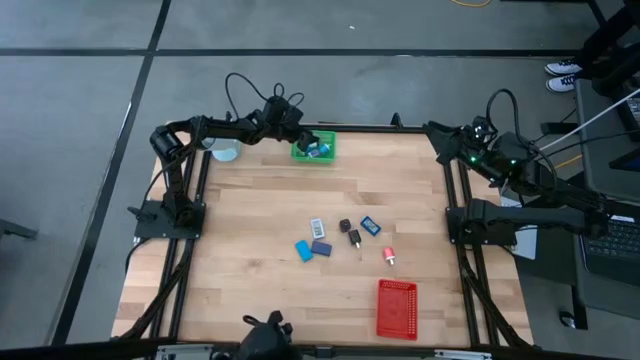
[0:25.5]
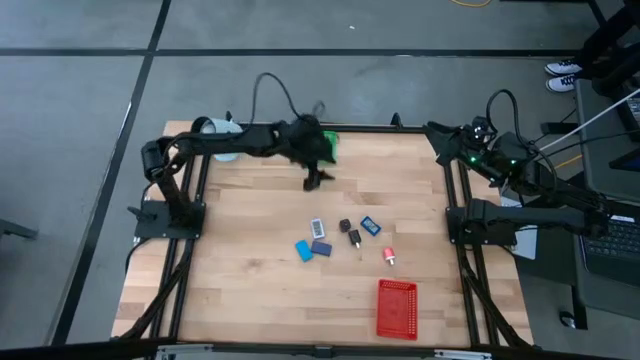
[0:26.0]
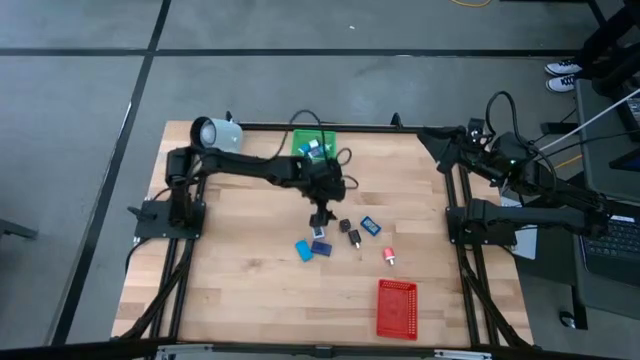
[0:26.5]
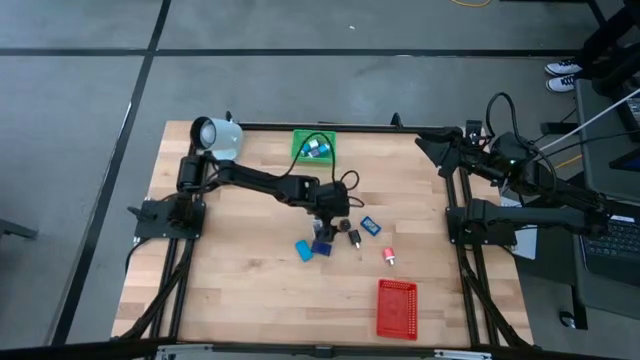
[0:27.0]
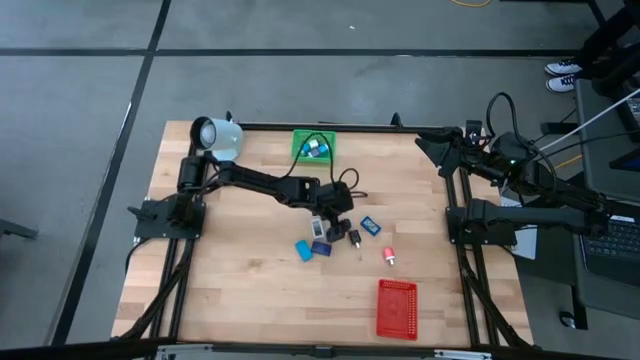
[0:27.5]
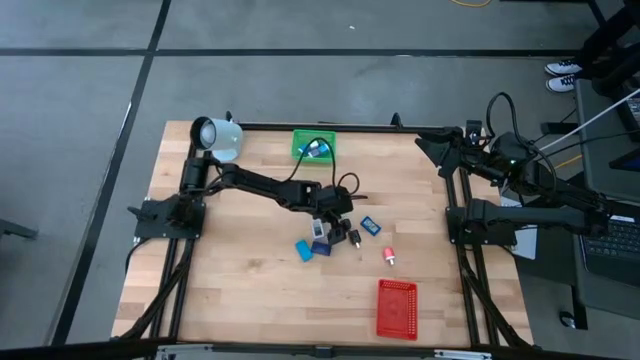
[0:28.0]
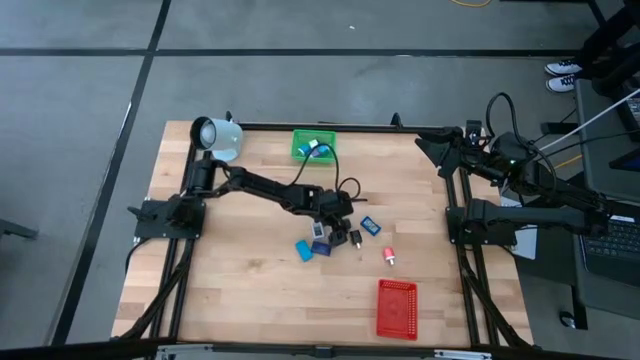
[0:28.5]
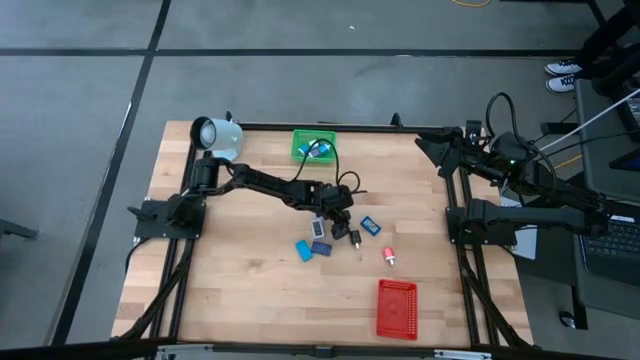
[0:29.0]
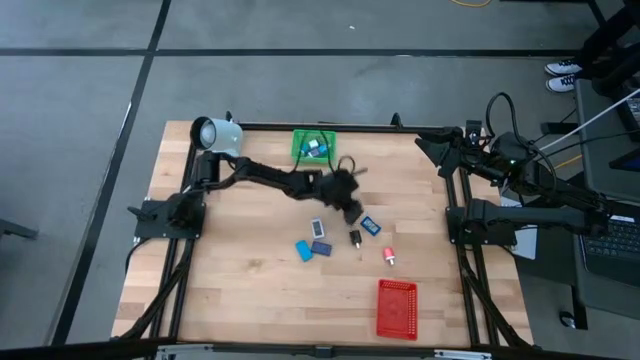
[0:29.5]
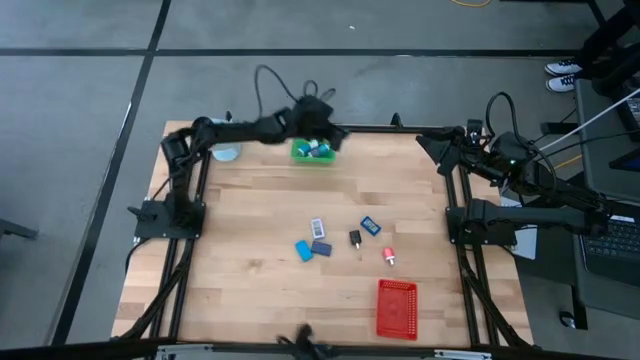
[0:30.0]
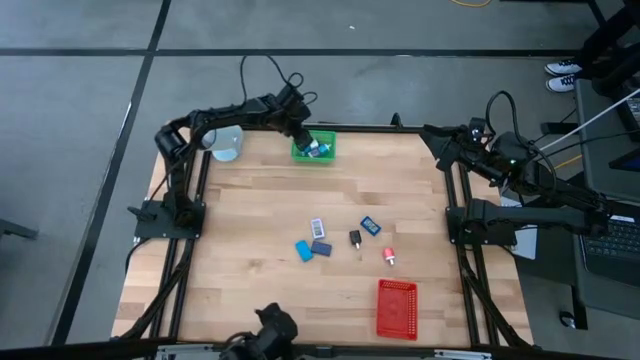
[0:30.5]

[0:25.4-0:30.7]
Task: Pick & Place Office items
Put the top black charger adapter into the green bin

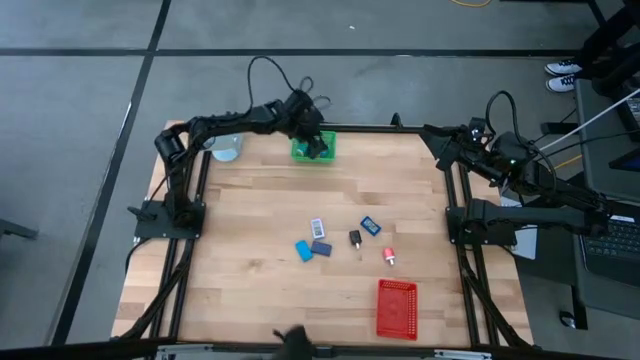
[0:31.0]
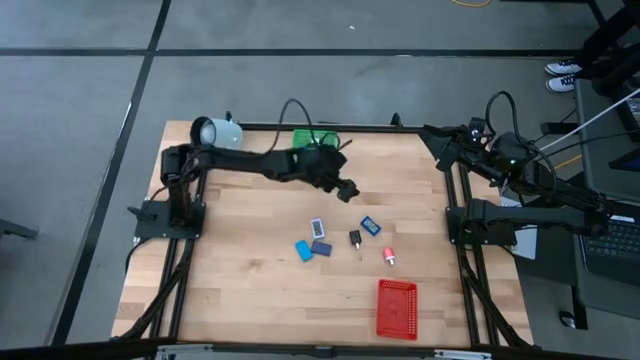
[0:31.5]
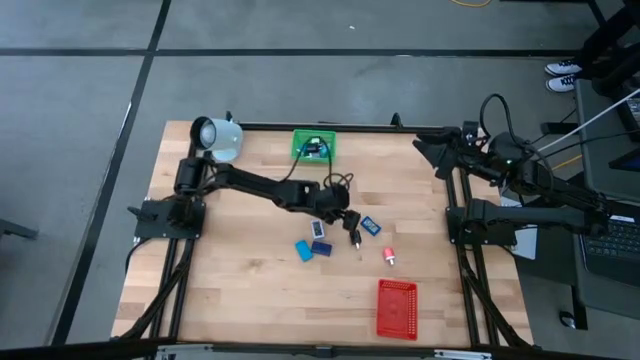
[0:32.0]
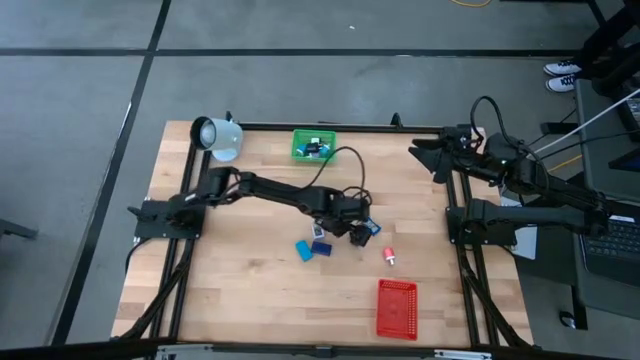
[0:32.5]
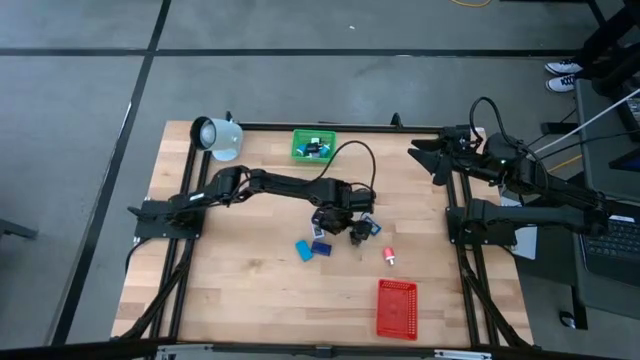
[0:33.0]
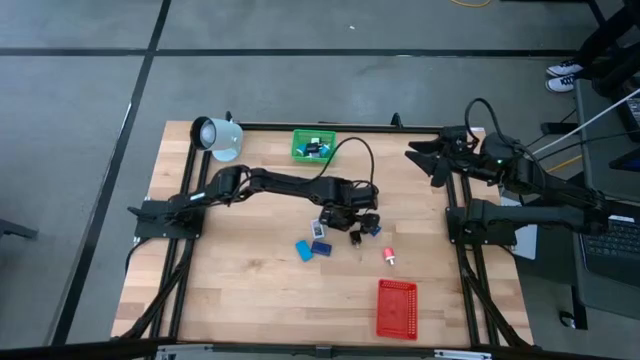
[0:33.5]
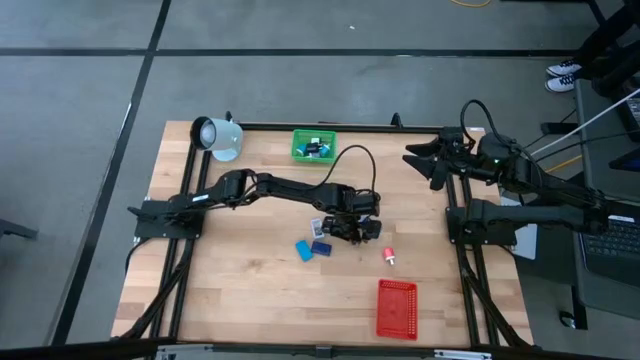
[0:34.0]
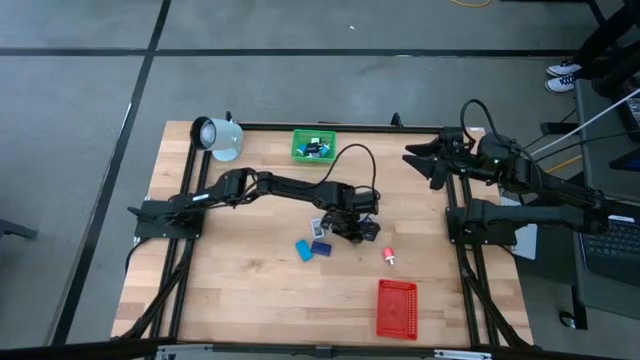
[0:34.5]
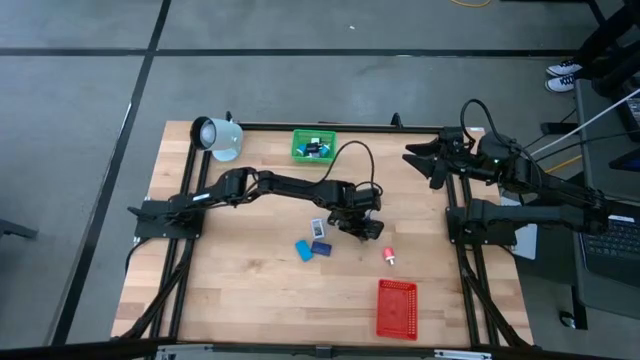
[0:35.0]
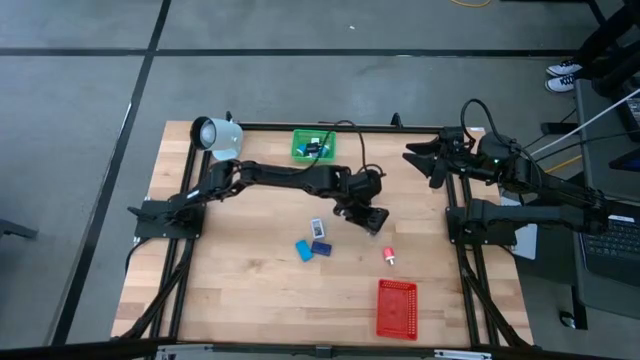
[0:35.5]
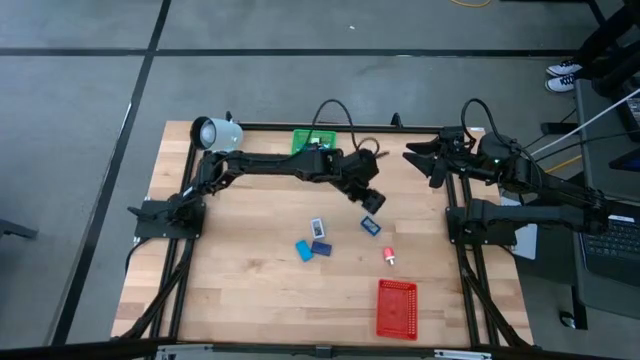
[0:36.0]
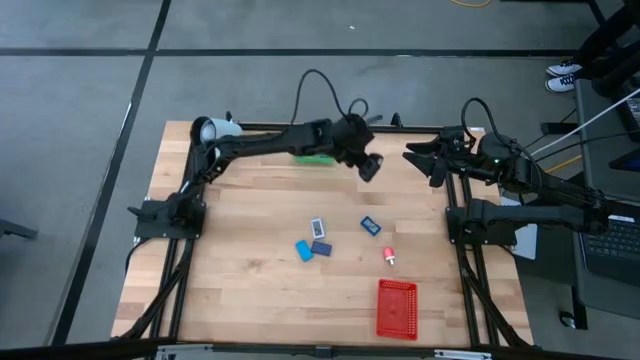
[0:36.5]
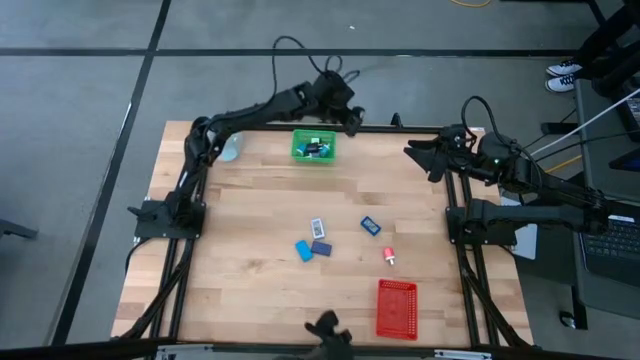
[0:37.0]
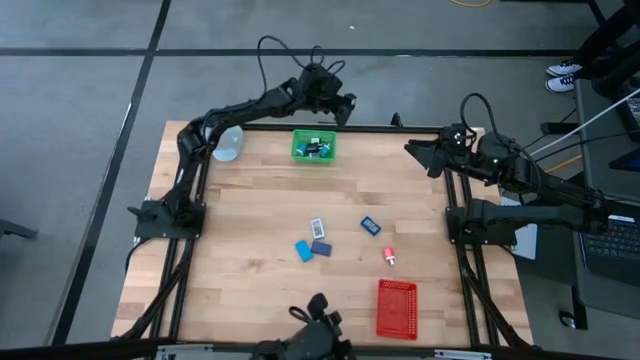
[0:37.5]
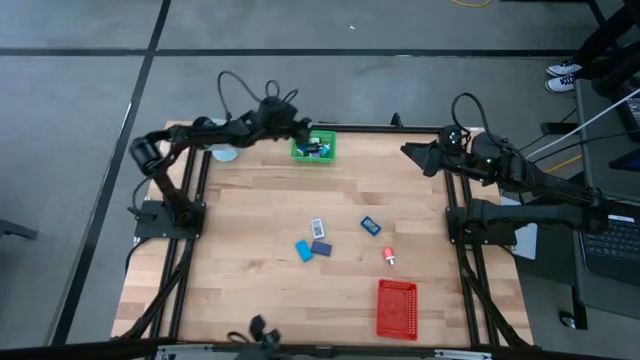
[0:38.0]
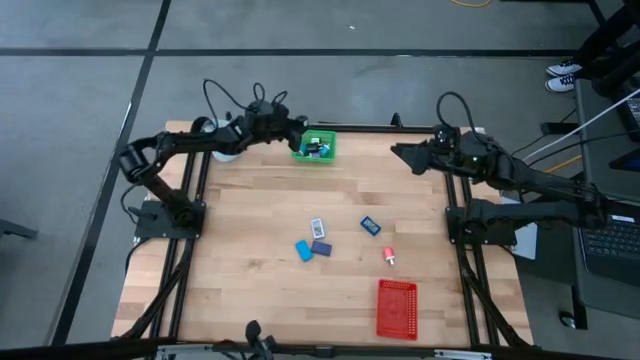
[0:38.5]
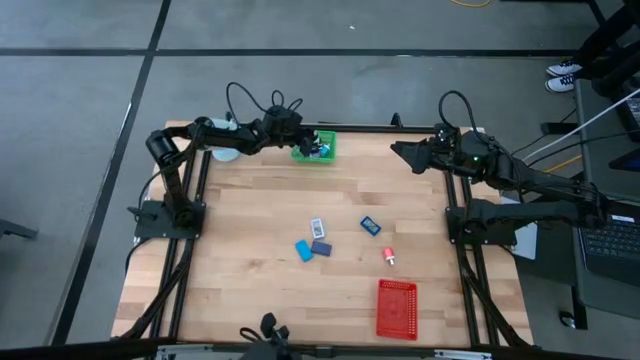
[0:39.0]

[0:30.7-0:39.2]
Put the black charger adapter into the green bin

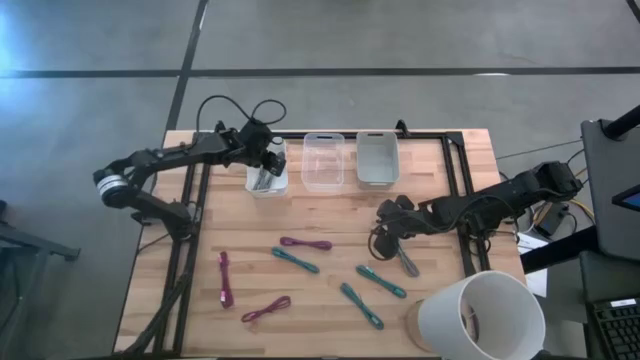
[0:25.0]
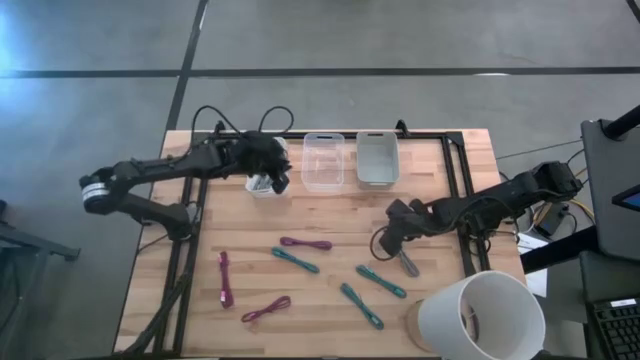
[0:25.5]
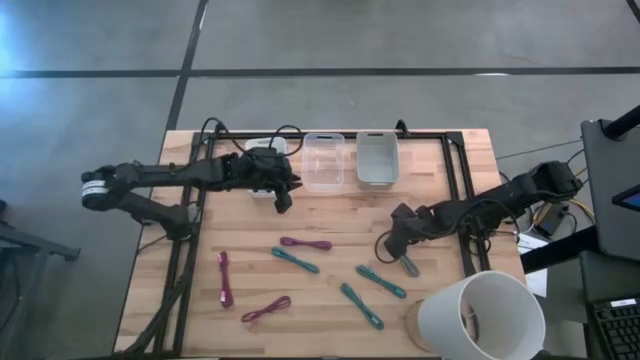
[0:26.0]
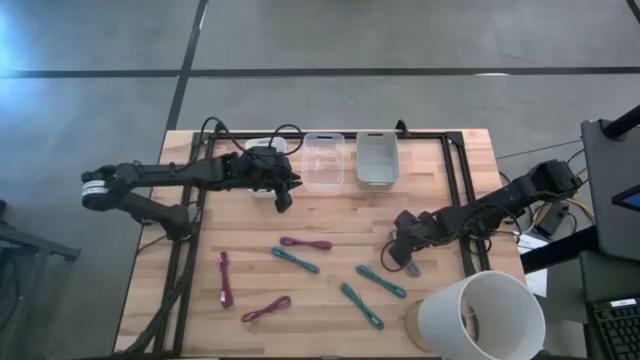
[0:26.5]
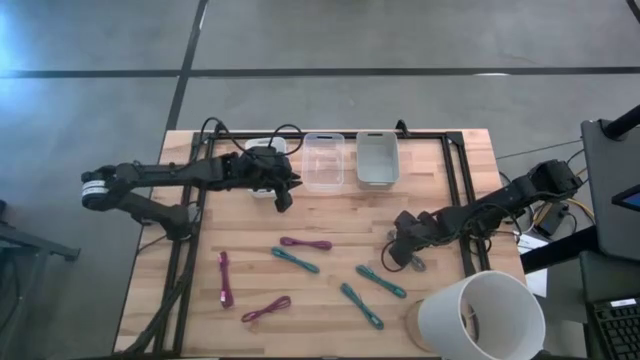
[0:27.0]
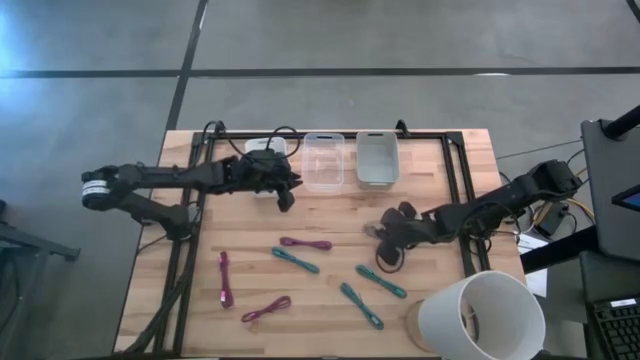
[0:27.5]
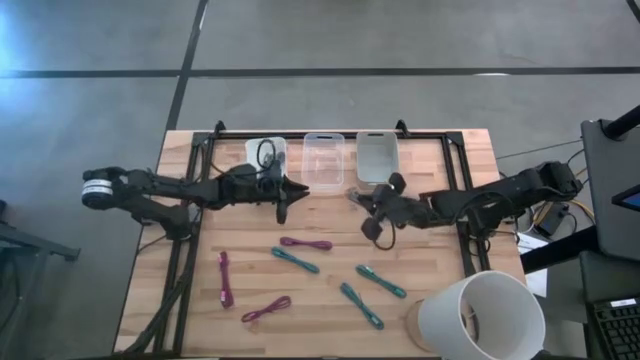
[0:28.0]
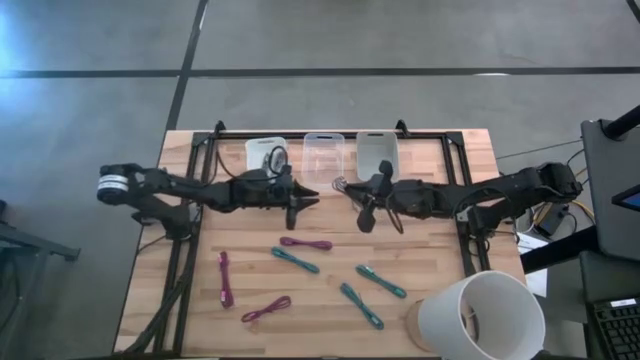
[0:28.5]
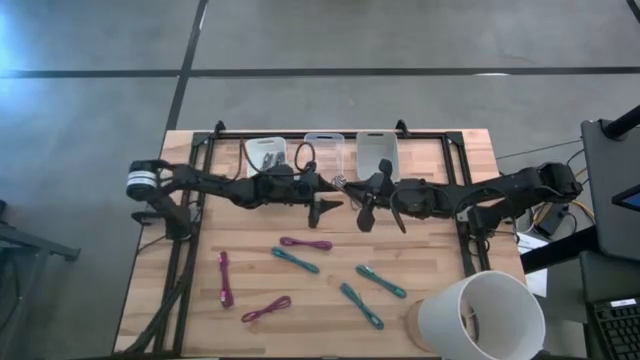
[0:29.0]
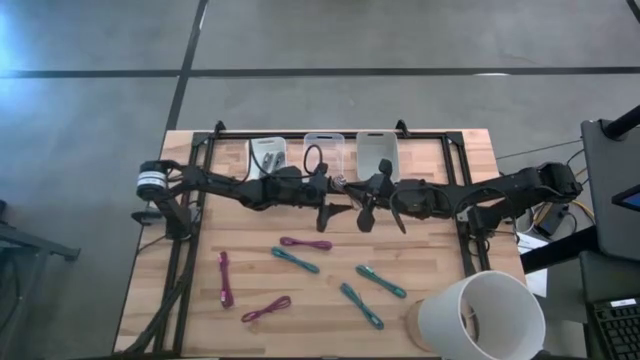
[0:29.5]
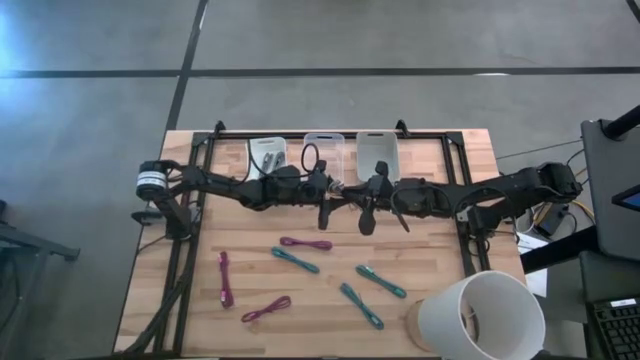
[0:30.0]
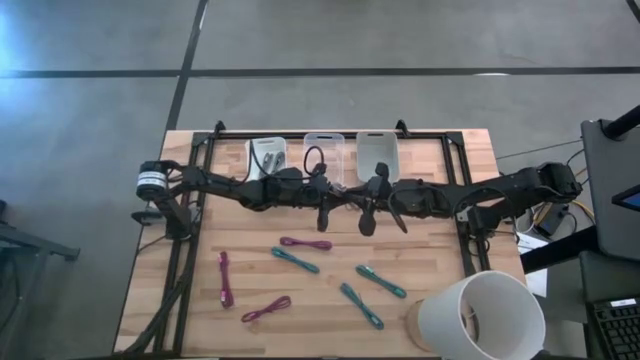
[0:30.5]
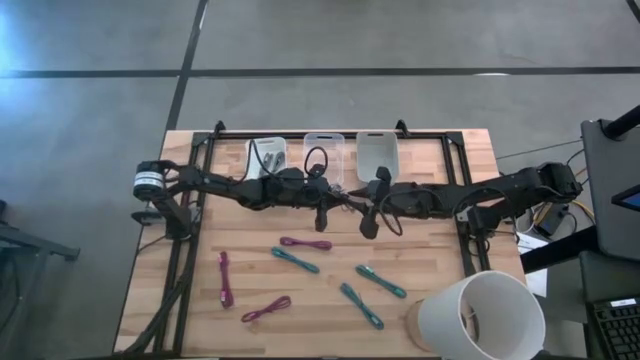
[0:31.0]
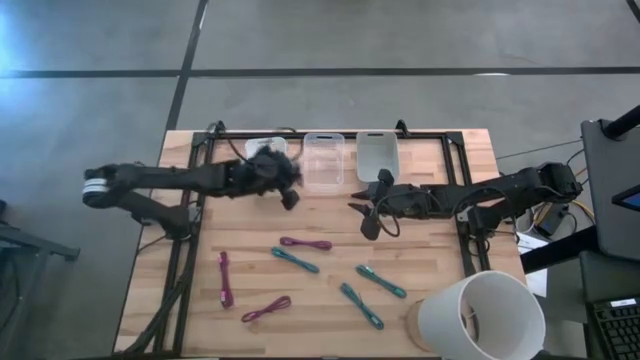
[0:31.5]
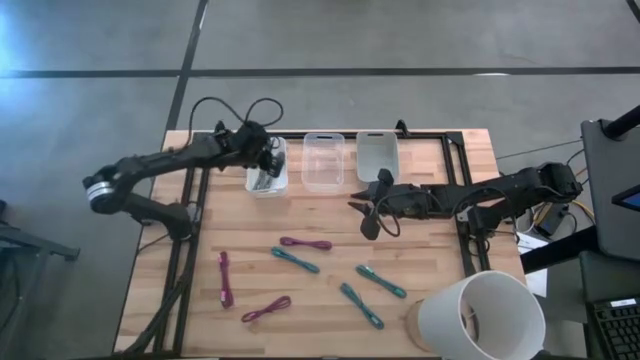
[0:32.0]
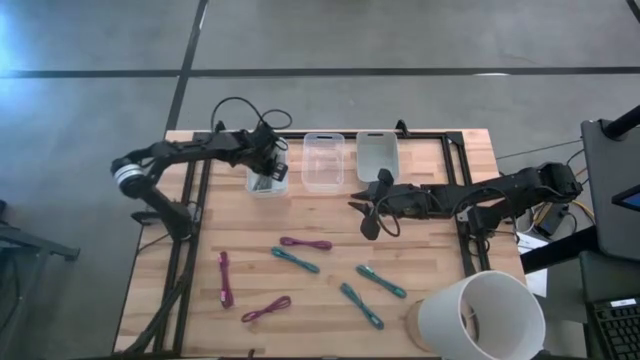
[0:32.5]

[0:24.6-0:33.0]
Task: Pick & Place USB Port
Put the gray charger cable into the white bin
